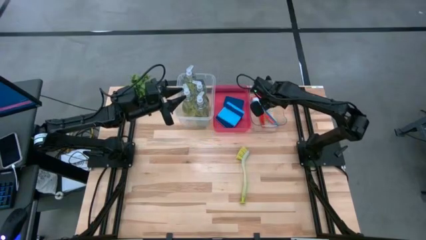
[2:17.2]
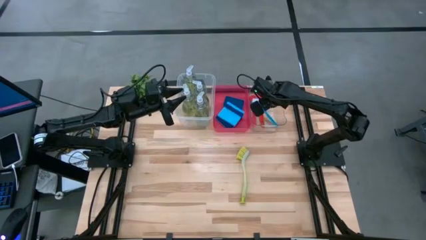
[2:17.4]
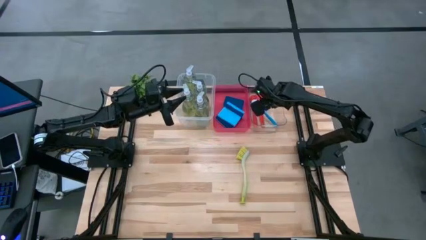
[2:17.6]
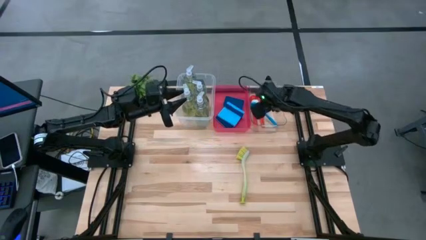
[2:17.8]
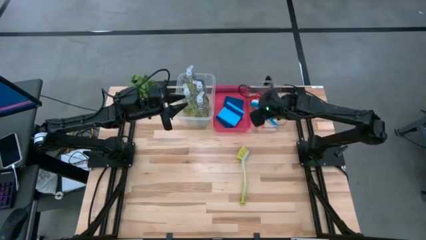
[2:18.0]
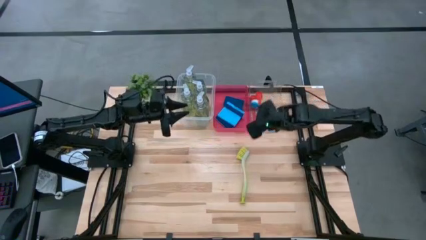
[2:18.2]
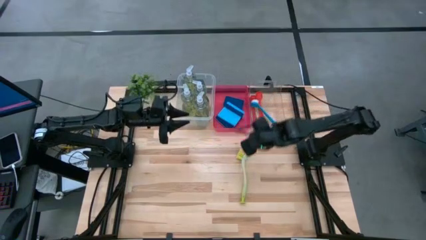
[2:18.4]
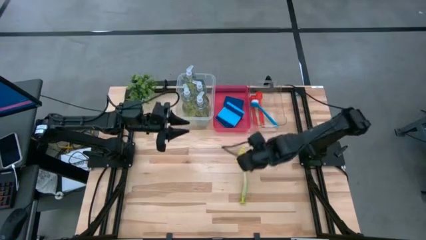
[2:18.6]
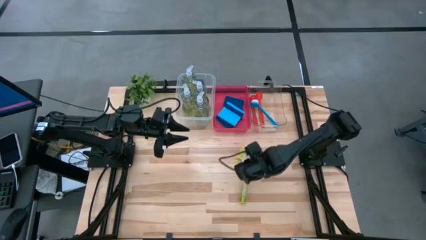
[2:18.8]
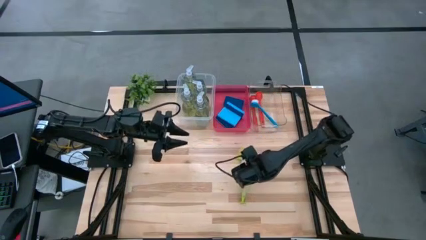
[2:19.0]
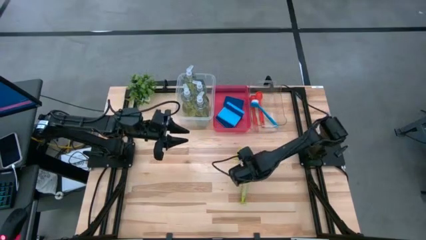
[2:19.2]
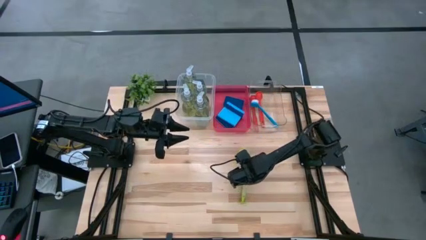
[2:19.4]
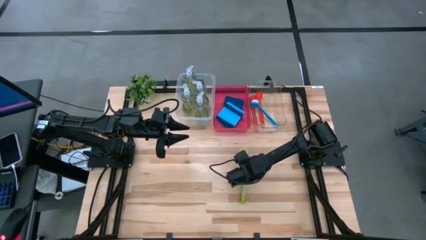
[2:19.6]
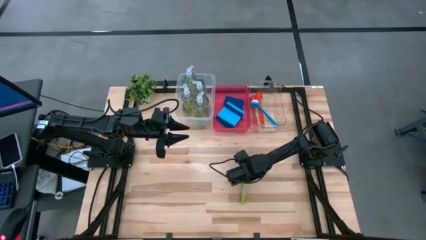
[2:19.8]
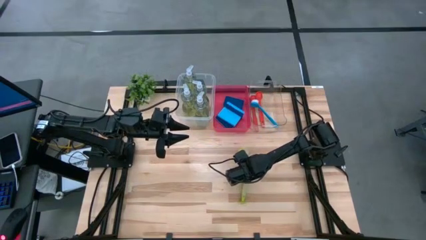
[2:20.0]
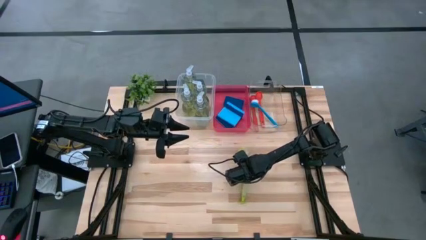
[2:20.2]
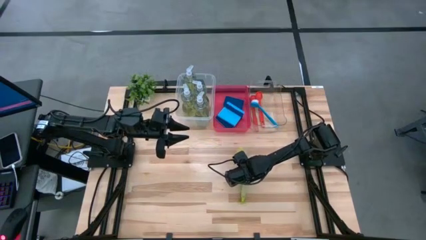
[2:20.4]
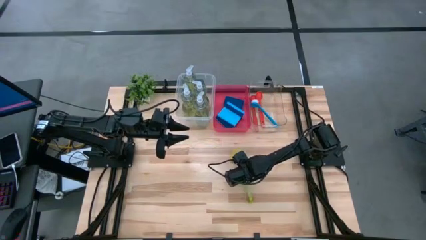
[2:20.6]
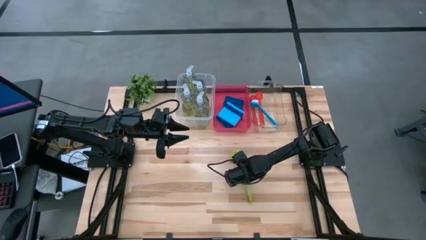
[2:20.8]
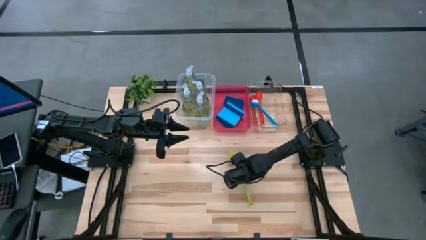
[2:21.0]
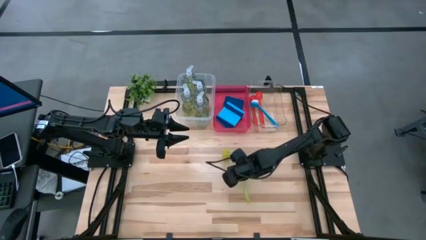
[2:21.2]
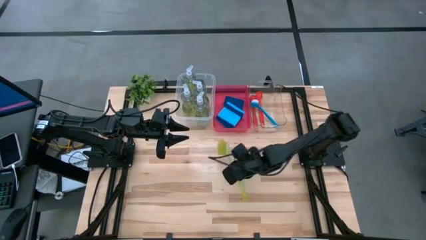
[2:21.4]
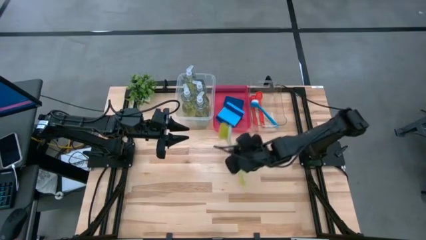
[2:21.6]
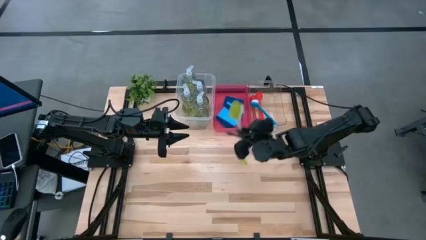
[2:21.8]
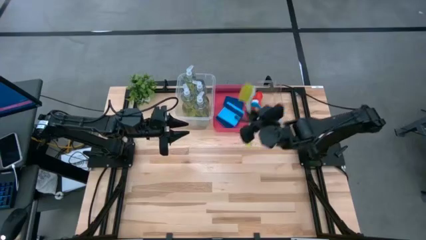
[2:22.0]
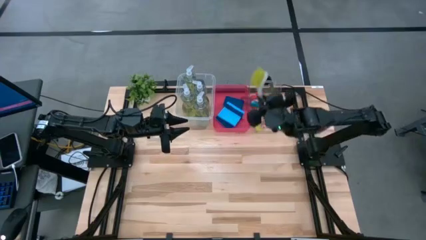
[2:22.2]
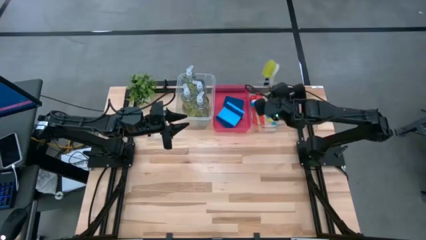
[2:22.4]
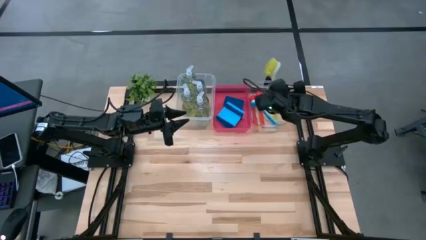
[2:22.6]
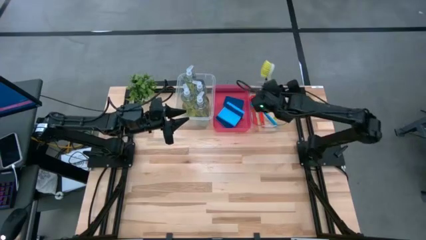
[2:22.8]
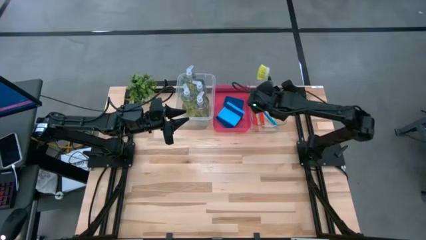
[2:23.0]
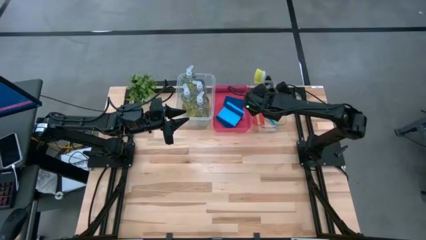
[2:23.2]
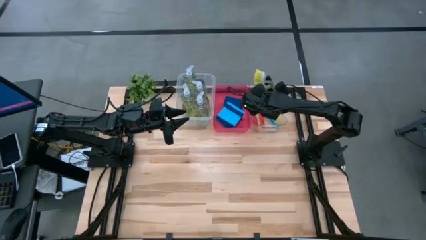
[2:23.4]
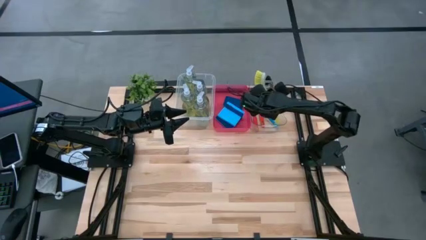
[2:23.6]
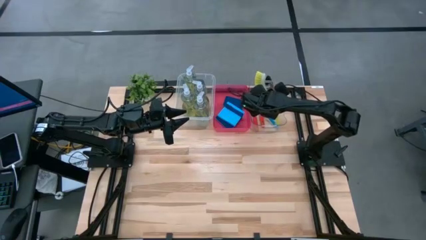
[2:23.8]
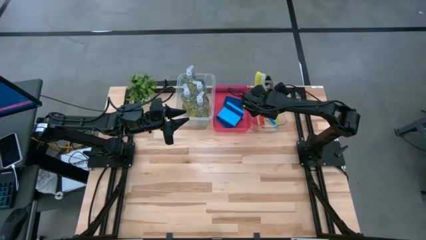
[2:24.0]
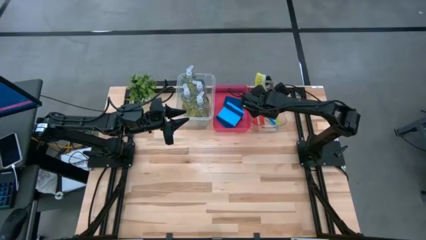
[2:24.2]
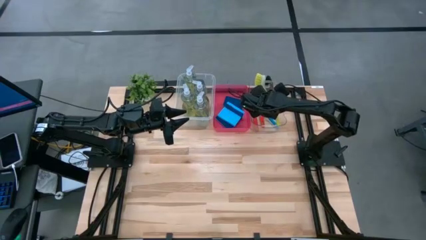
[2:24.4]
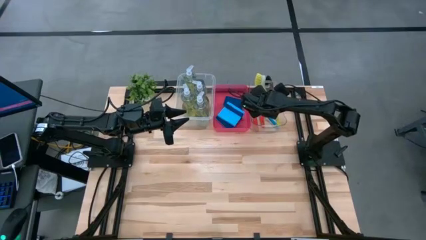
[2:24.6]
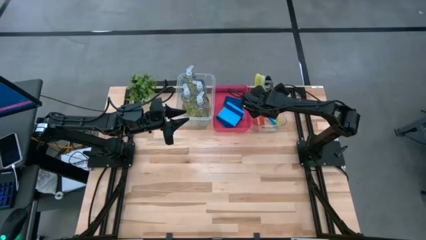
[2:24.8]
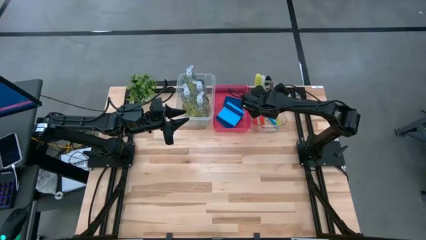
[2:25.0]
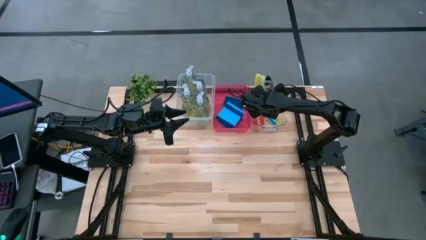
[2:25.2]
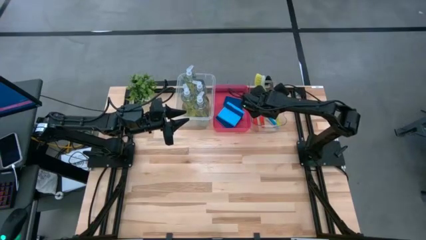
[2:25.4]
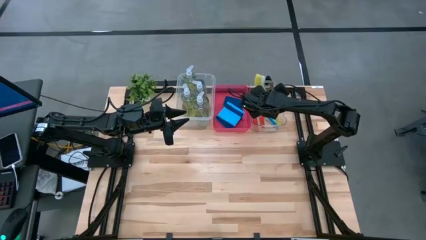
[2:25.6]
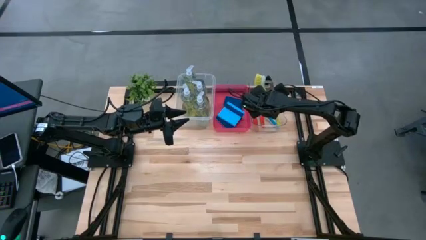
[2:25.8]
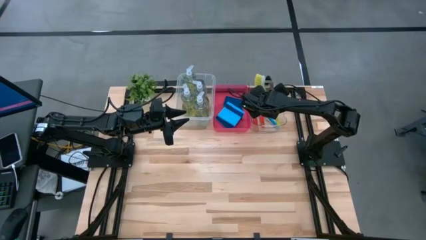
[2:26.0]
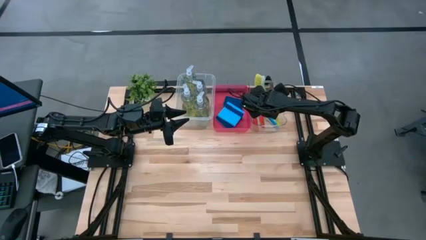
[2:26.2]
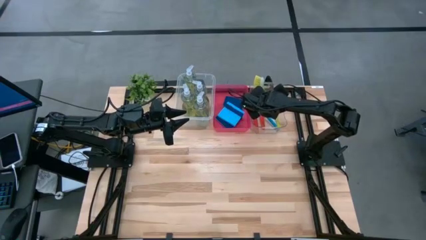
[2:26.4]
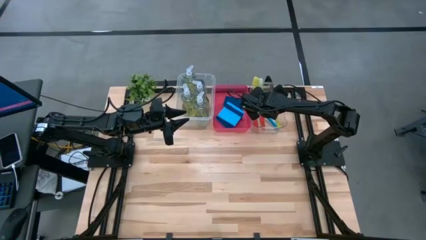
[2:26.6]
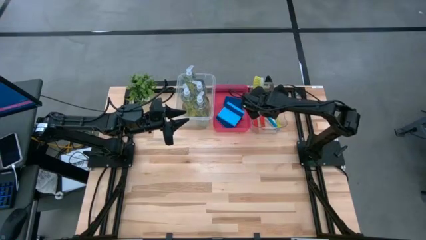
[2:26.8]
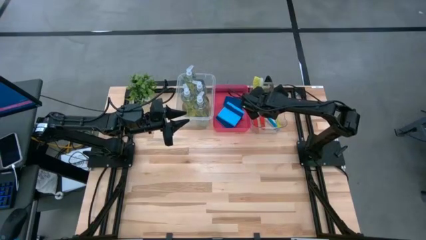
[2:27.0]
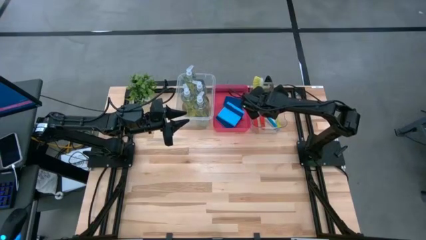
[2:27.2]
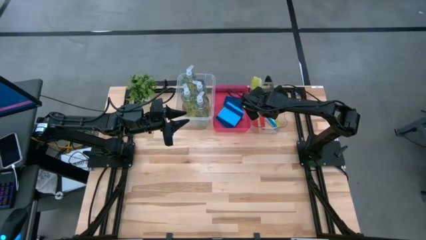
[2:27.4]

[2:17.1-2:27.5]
Task: Pick & Place Kitchen Sink Supplies
Put the green dish brush into the transparent bin

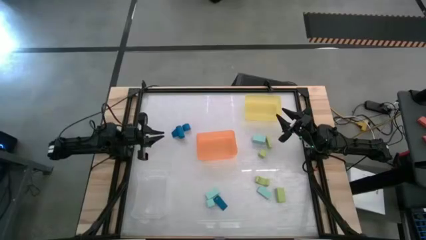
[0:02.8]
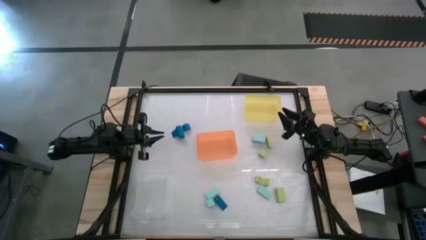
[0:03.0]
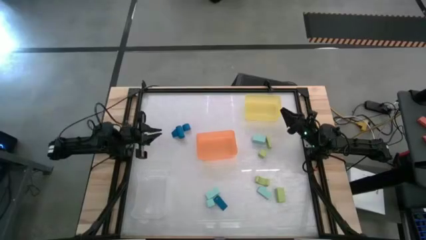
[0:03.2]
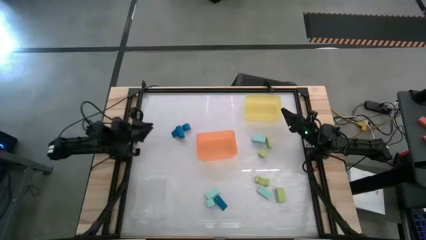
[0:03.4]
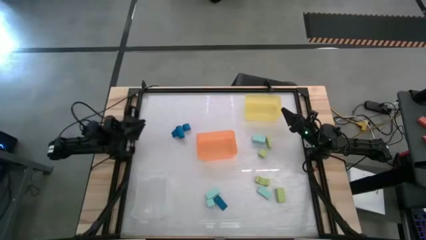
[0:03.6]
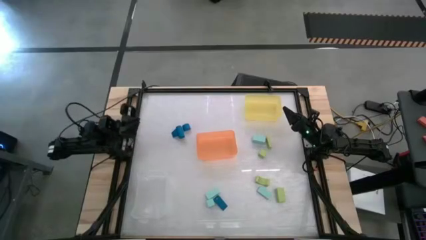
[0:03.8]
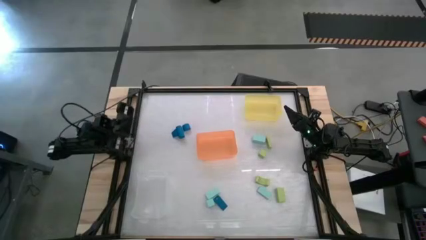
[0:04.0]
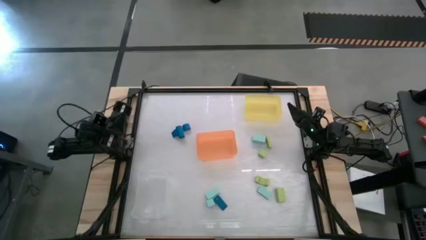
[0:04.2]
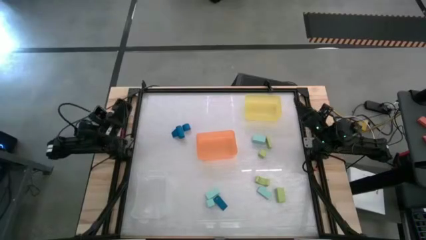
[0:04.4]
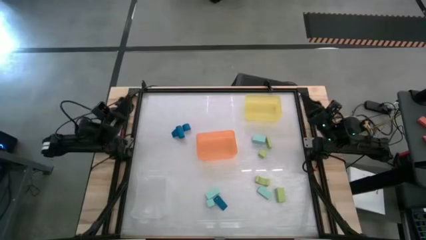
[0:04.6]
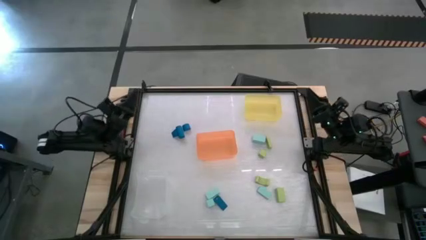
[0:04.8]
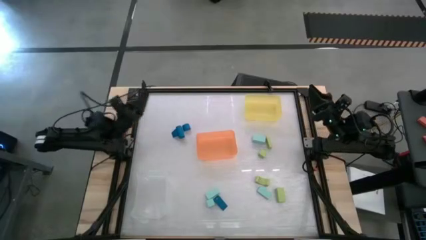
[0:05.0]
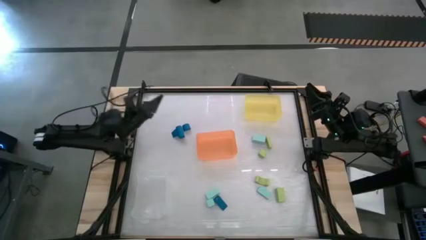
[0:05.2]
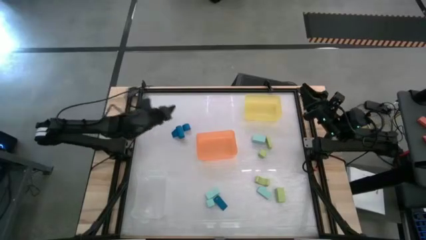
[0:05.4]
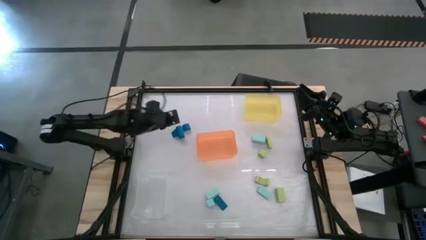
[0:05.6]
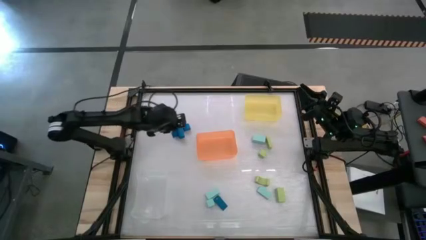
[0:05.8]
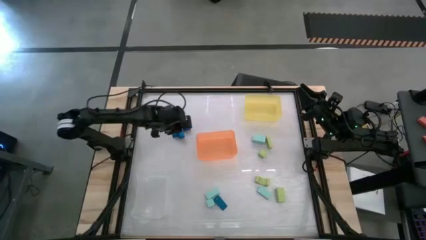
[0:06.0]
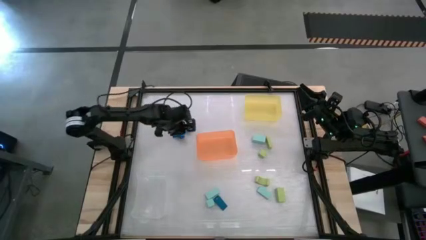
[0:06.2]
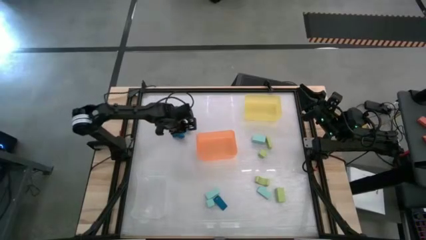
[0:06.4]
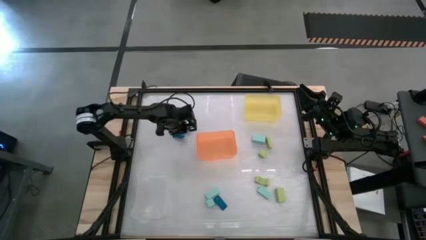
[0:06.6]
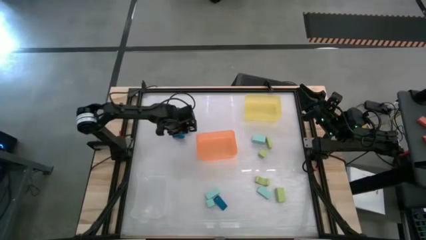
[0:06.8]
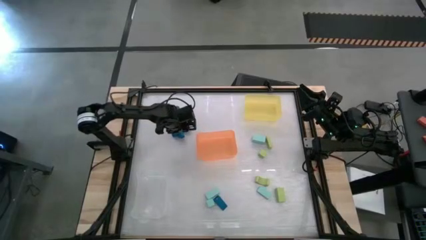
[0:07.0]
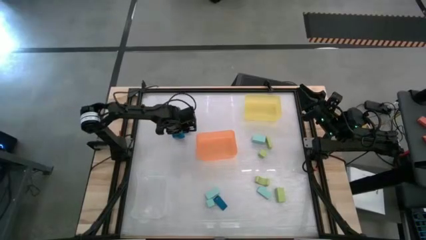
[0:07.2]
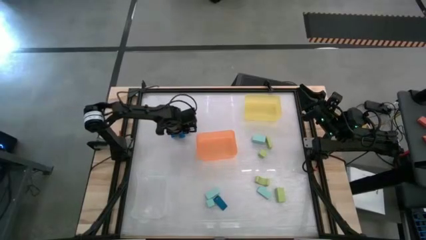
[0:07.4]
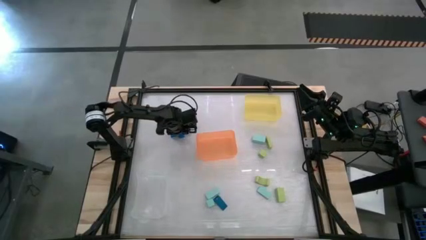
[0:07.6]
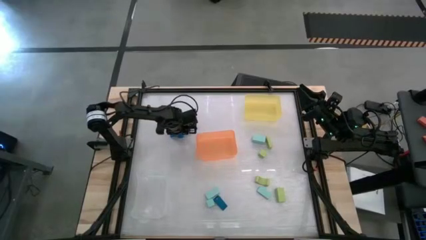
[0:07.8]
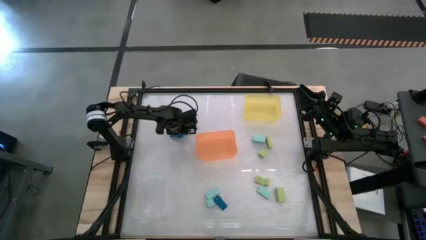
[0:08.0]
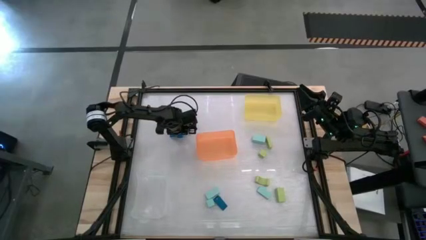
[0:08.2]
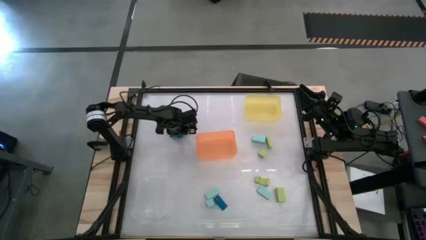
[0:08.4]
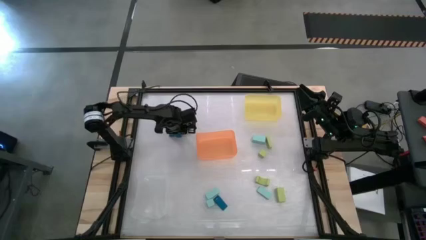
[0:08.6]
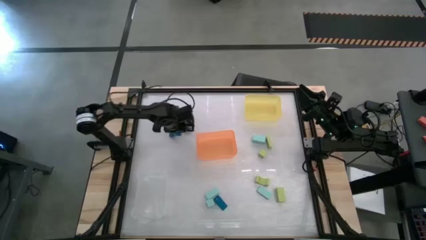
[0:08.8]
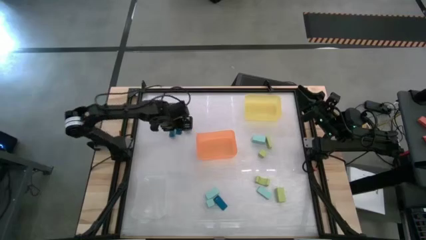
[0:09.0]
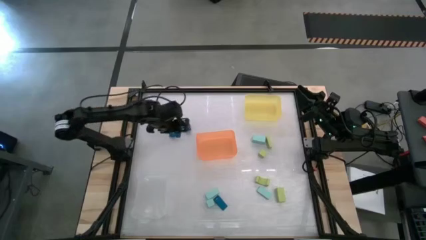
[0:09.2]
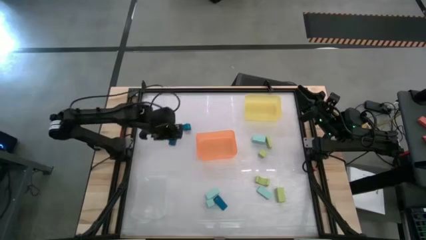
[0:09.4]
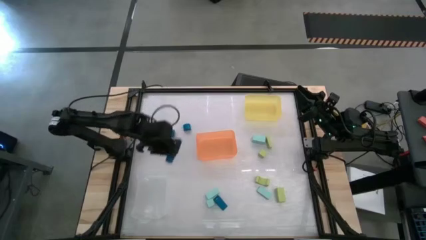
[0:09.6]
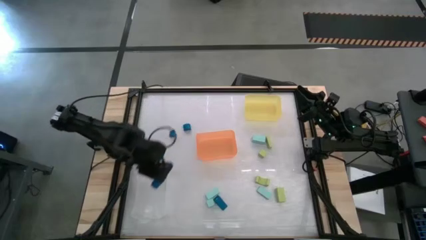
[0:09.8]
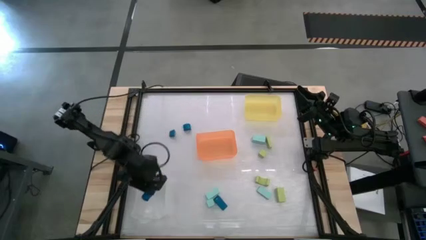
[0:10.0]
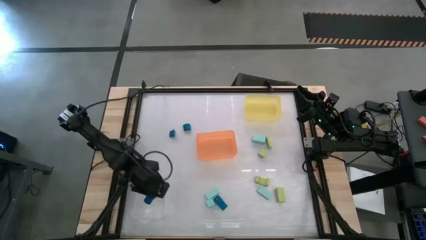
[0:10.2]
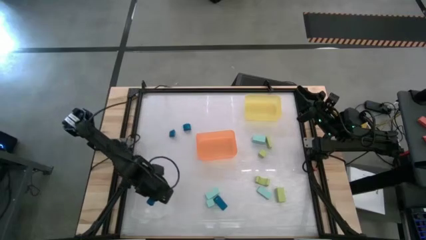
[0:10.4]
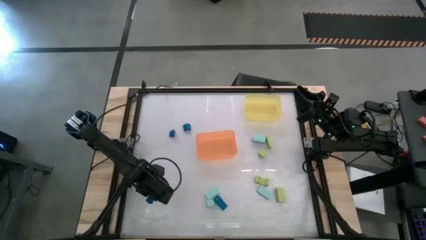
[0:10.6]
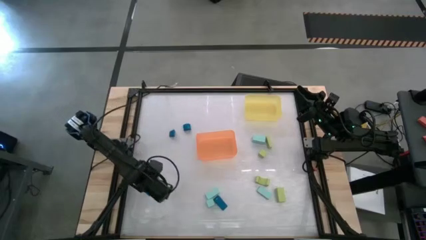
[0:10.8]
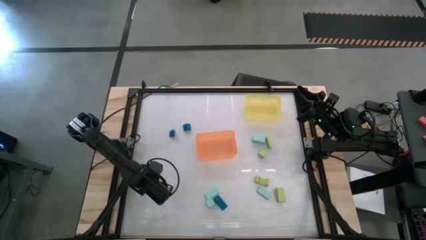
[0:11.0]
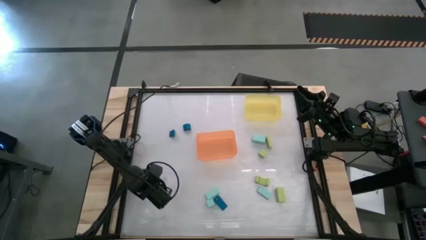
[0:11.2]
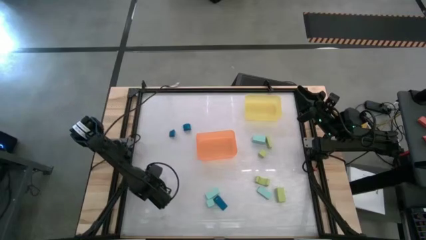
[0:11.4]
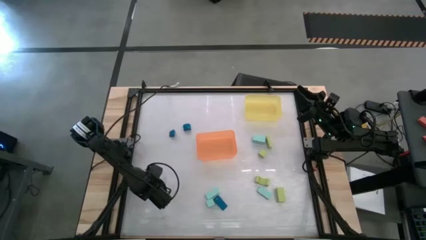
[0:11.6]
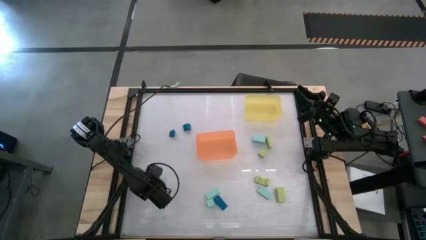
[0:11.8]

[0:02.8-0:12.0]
Task: Sort & place blocks by color
Put the blue block into the transparent bin
